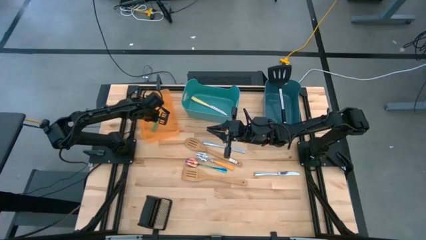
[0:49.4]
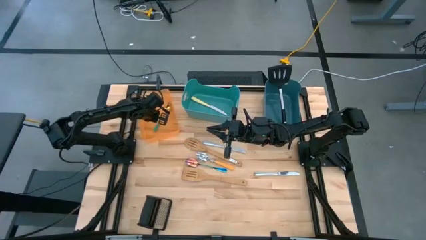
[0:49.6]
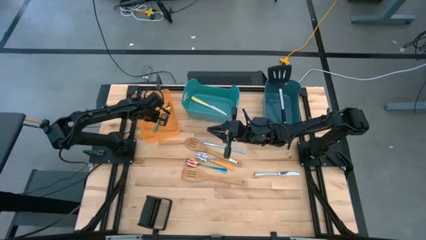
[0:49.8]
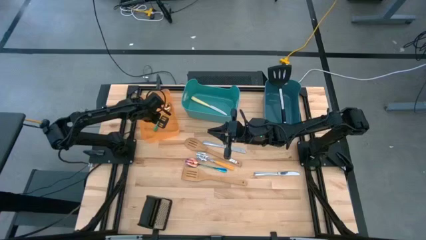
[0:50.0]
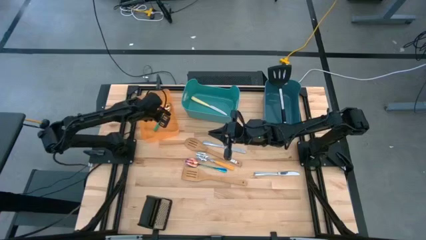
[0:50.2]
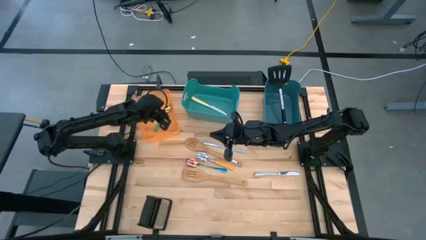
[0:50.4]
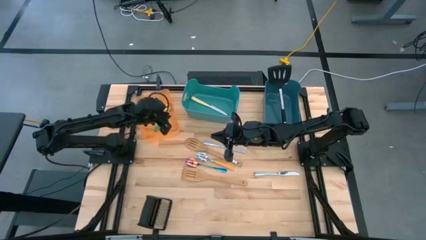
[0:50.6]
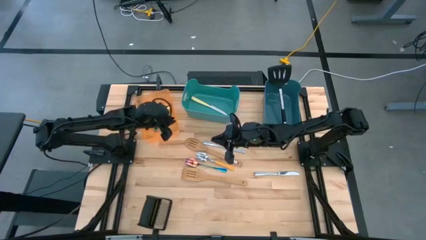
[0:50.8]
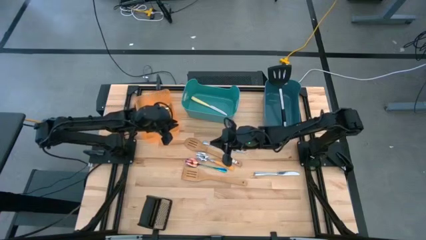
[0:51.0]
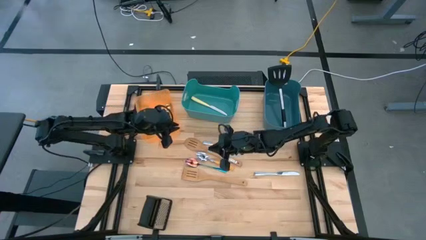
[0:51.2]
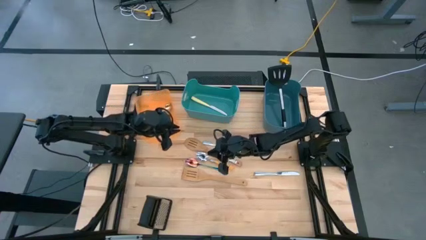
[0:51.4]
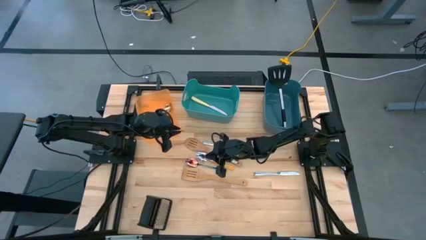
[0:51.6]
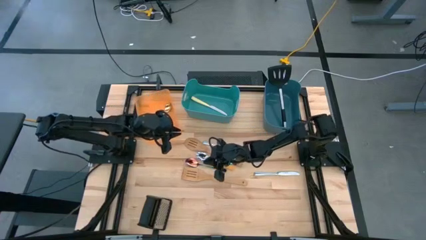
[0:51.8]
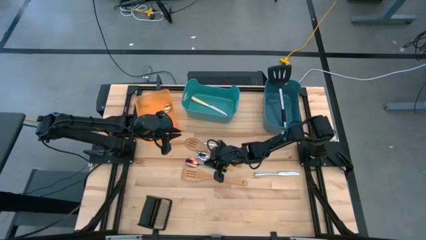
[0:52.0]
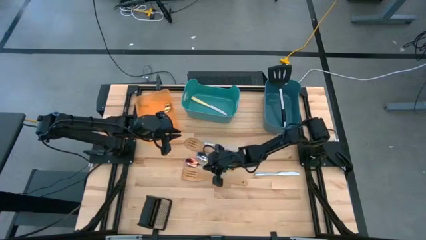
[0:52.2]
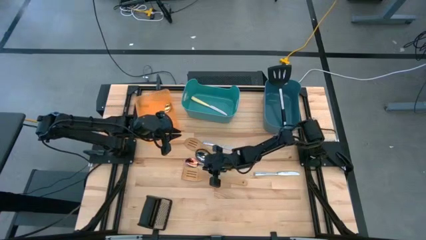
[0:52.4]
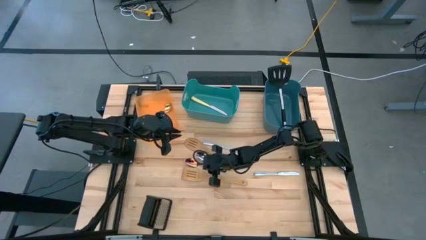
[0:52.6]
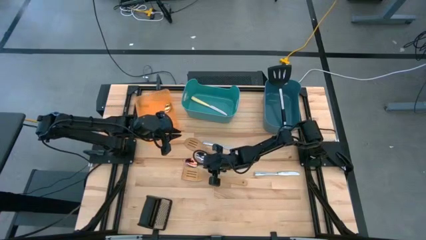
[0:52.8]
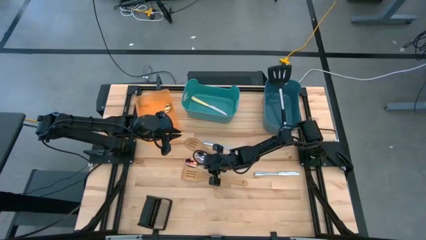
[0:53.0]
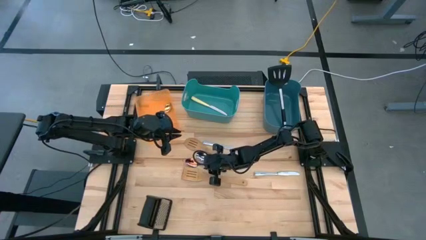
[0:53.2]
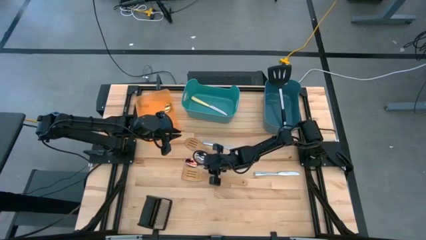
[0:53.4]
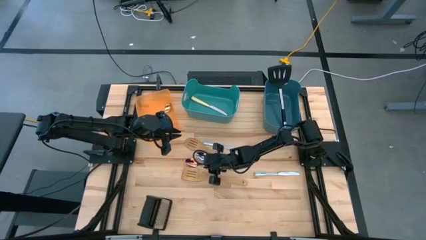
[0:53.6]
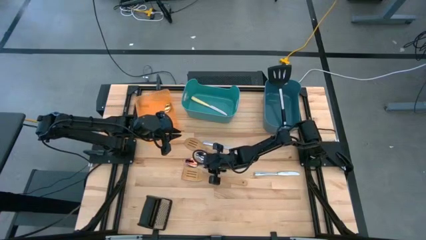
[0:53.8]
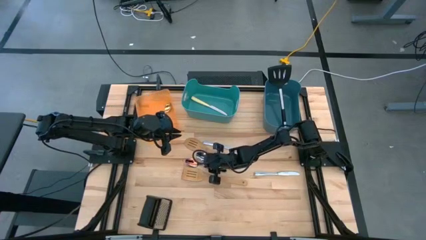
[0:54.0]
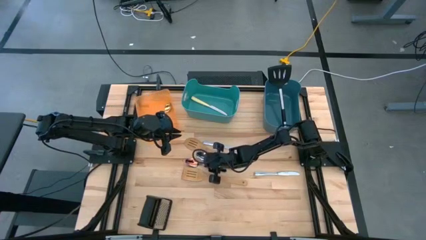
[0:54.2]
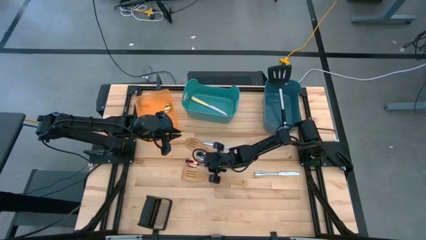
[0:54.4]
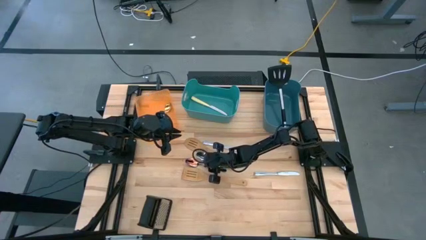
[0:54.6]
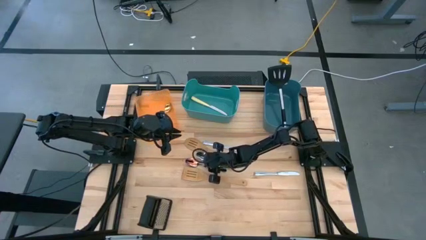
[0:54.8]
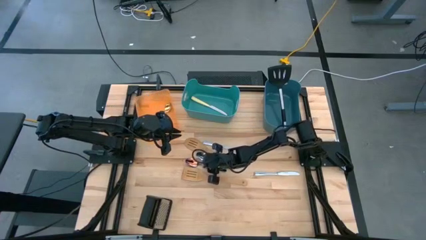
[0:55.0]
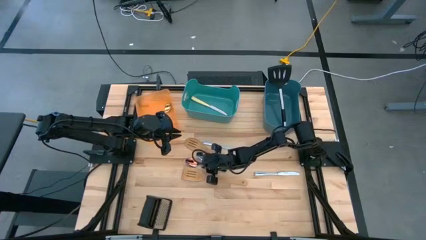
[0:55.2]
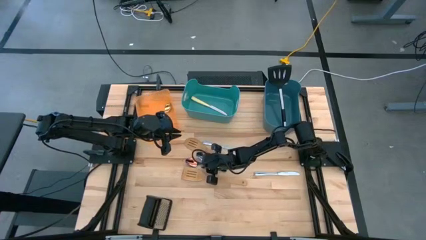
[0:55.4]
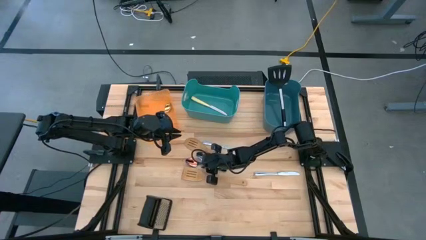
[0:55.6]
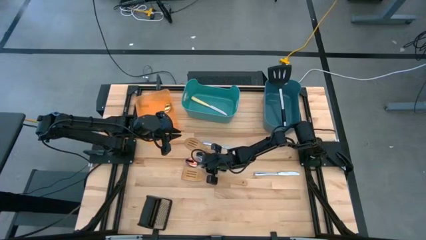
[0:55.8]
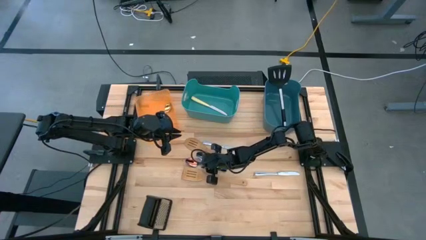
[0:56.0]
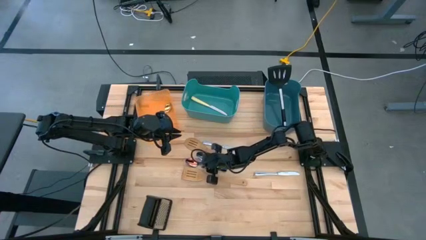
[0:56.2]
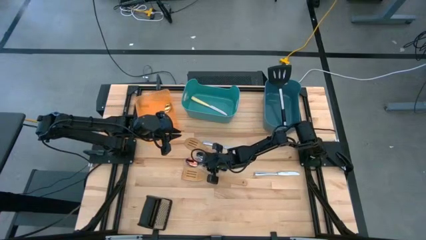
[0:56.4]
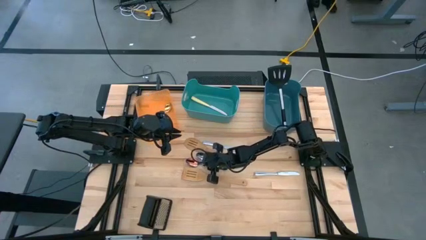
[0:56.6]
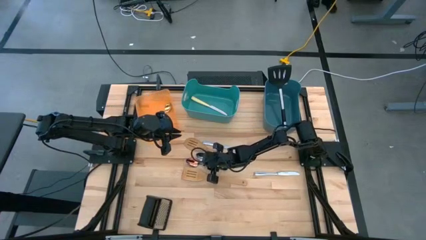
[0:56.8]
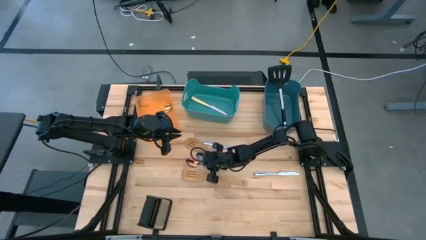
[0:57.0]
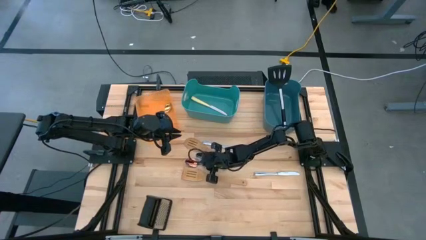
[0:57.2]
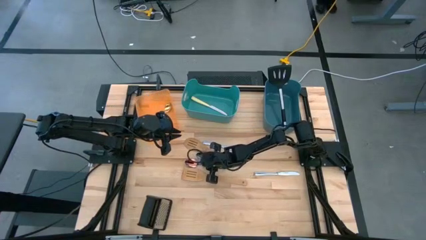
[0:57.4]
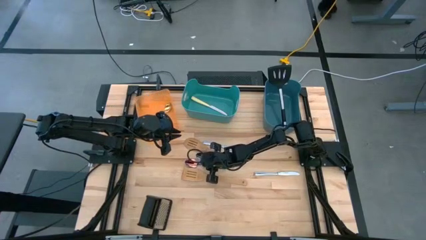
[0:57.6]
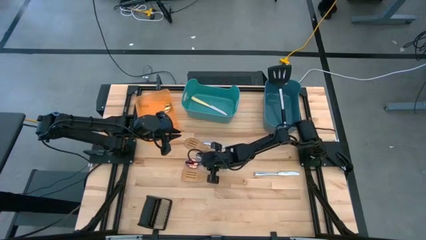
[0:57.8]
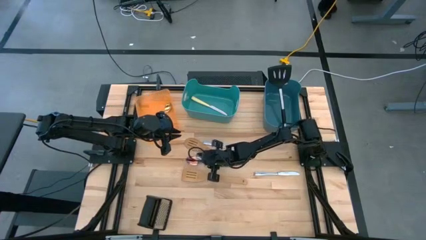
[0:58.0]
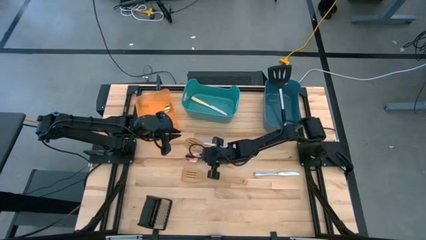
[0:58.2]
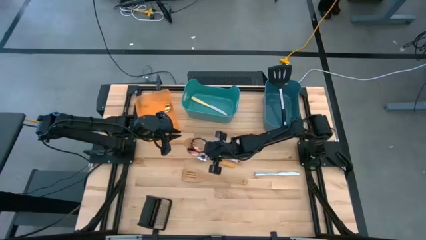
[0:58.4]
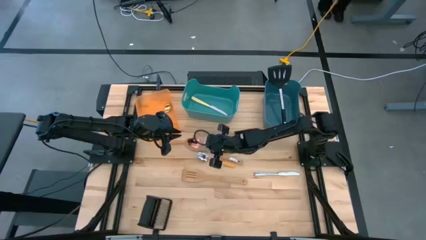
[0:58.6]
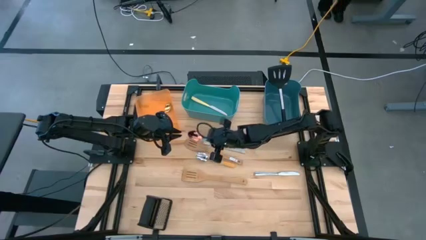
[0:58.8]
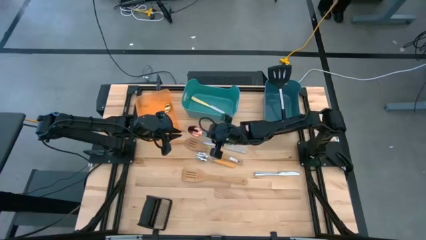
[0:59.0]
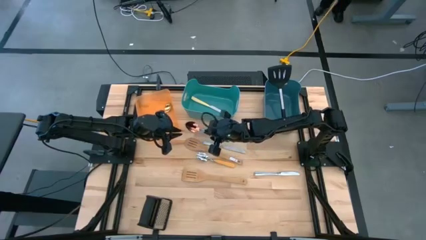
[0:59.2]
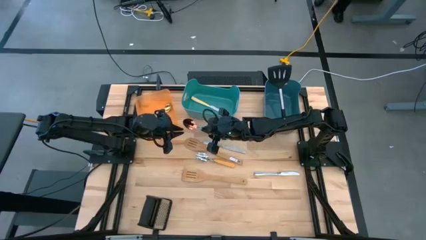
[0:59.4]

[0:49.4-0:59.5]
Task: Pick & Place Kitchen Items
Put the purple spoon into the orange bin
